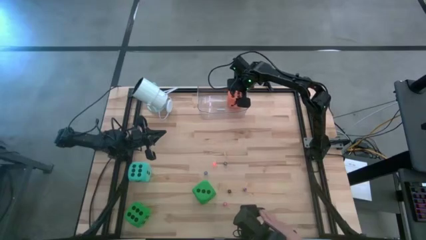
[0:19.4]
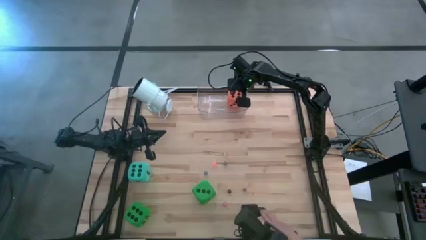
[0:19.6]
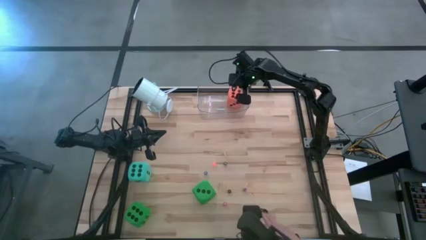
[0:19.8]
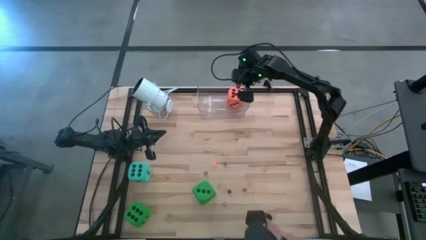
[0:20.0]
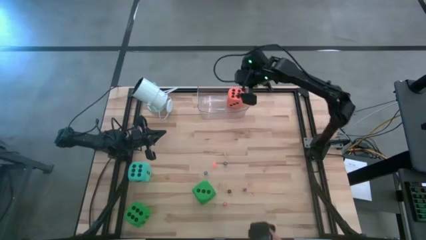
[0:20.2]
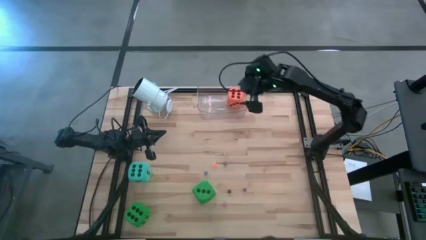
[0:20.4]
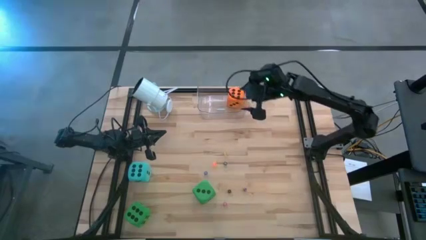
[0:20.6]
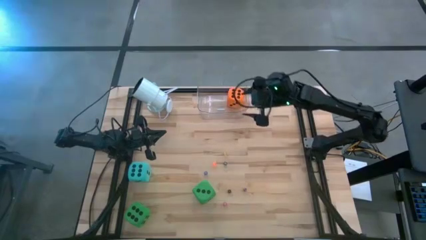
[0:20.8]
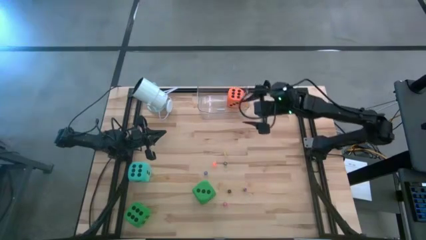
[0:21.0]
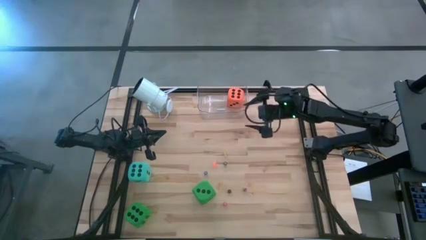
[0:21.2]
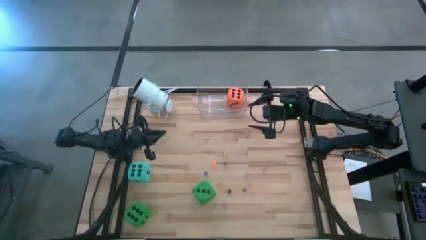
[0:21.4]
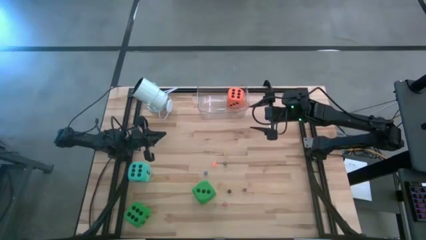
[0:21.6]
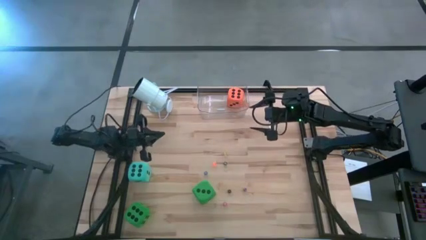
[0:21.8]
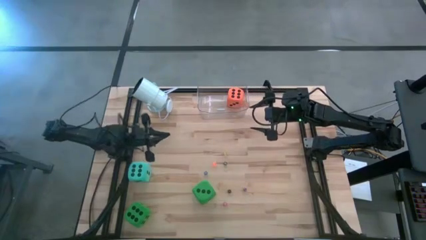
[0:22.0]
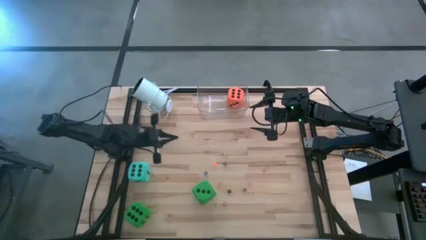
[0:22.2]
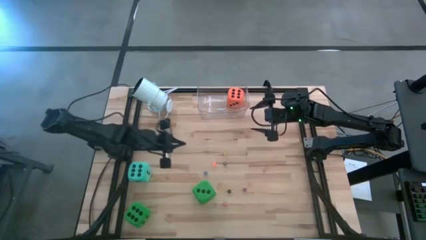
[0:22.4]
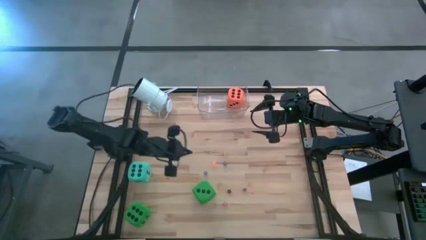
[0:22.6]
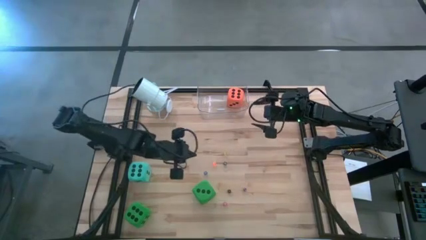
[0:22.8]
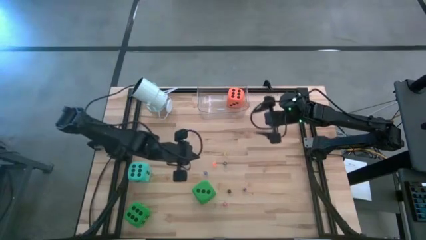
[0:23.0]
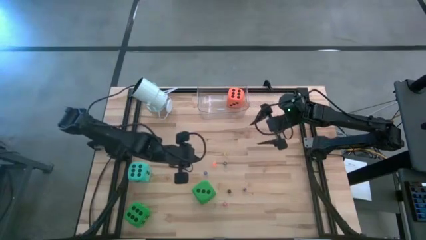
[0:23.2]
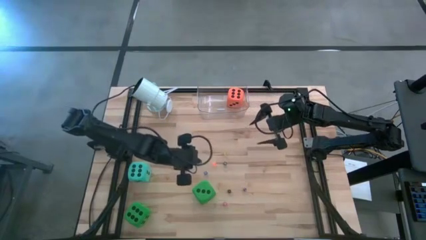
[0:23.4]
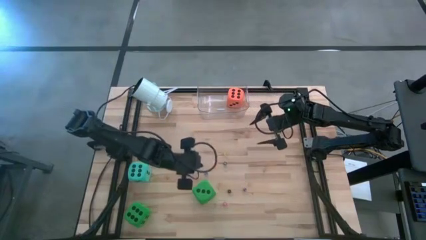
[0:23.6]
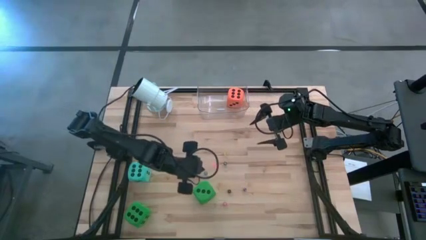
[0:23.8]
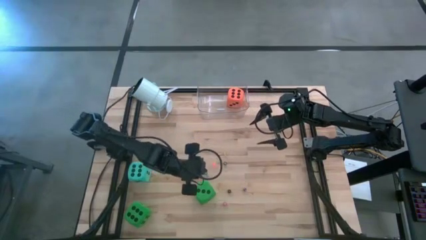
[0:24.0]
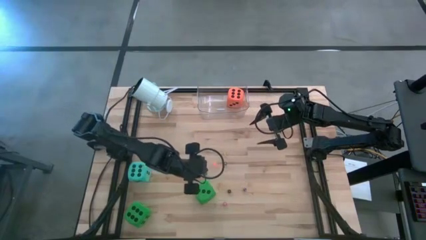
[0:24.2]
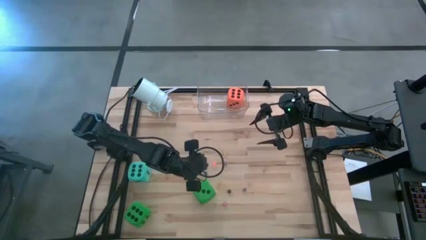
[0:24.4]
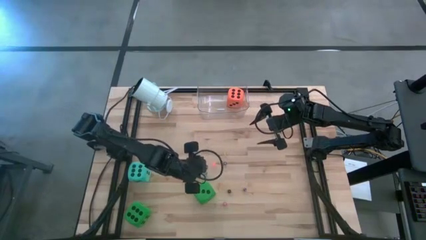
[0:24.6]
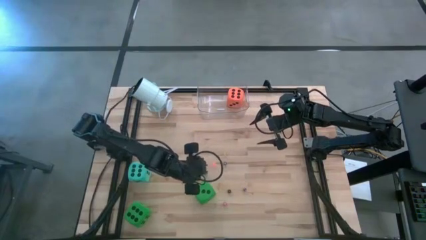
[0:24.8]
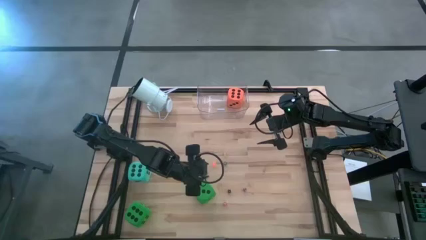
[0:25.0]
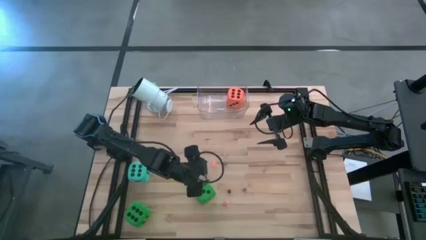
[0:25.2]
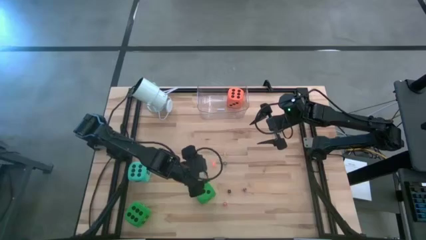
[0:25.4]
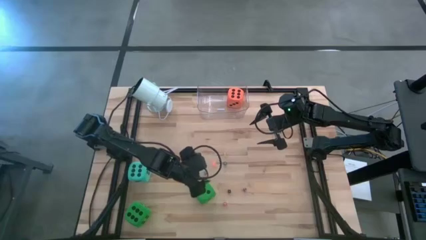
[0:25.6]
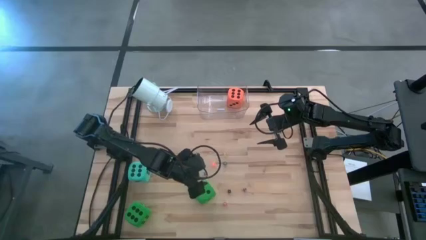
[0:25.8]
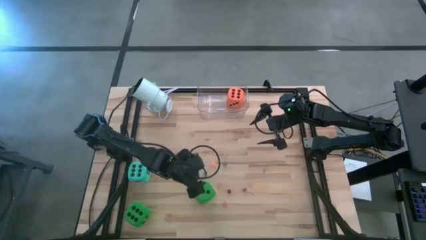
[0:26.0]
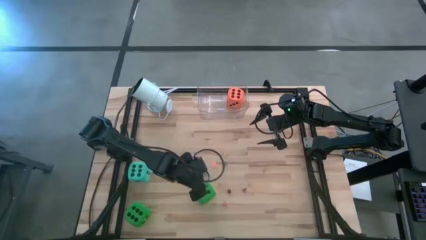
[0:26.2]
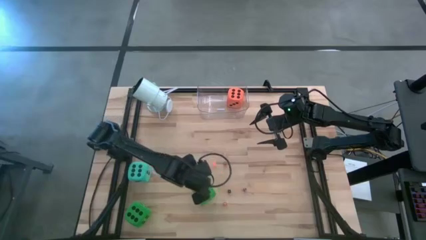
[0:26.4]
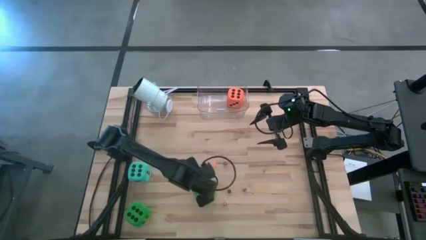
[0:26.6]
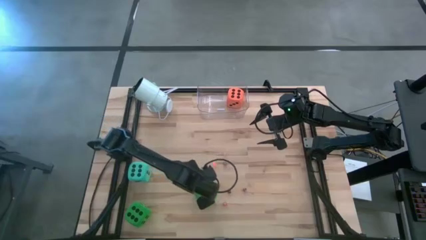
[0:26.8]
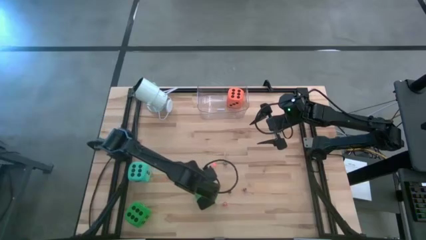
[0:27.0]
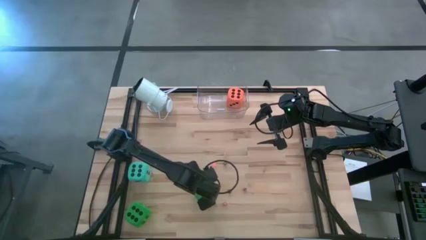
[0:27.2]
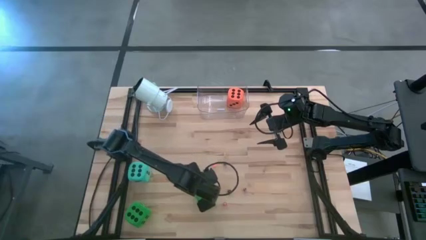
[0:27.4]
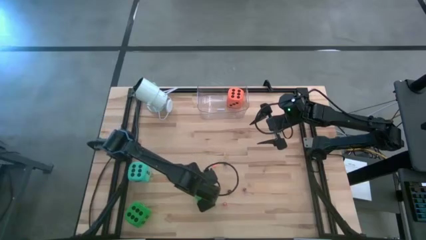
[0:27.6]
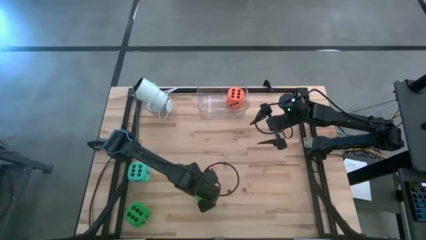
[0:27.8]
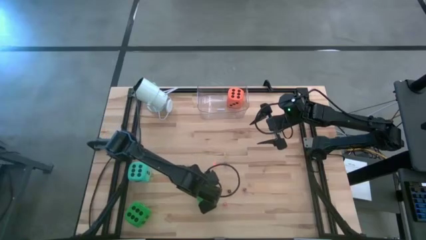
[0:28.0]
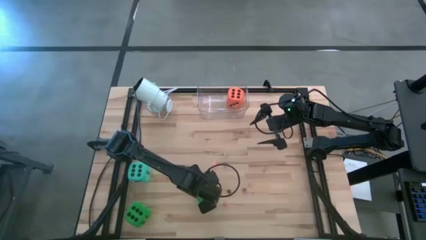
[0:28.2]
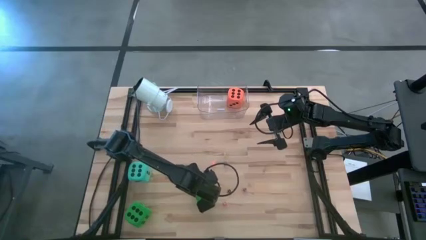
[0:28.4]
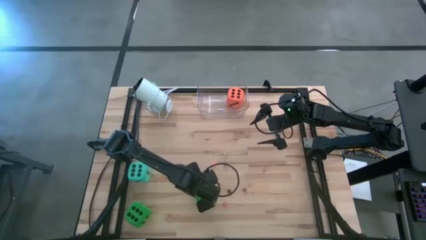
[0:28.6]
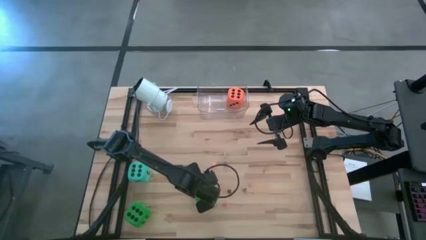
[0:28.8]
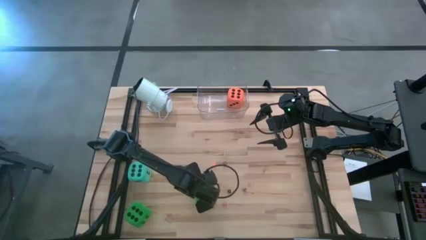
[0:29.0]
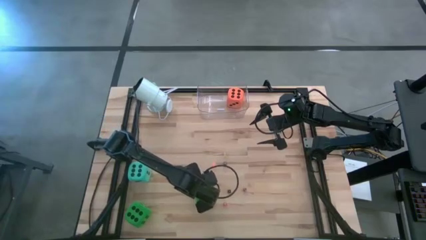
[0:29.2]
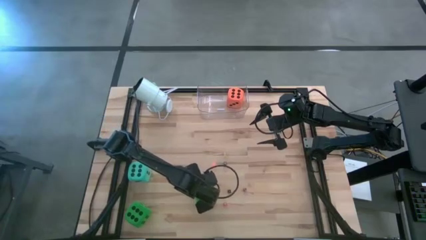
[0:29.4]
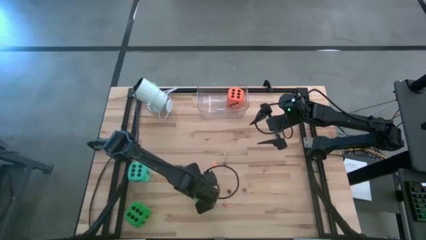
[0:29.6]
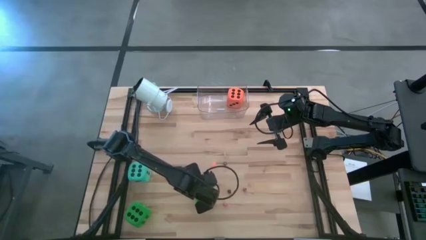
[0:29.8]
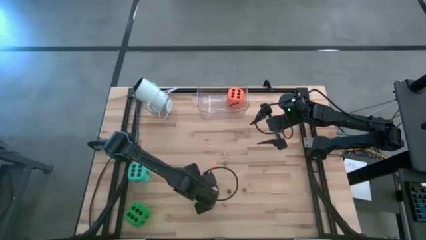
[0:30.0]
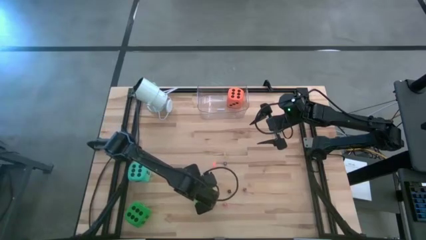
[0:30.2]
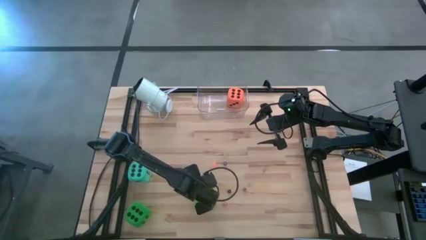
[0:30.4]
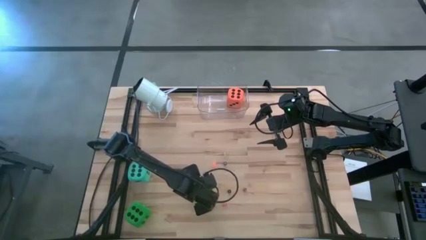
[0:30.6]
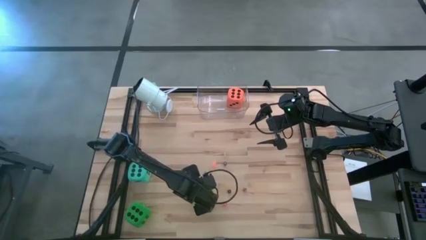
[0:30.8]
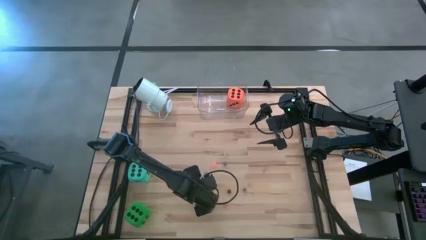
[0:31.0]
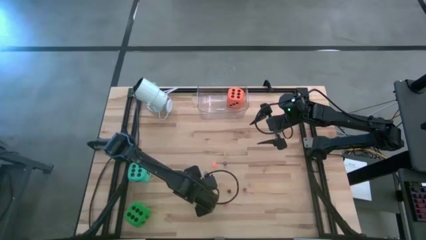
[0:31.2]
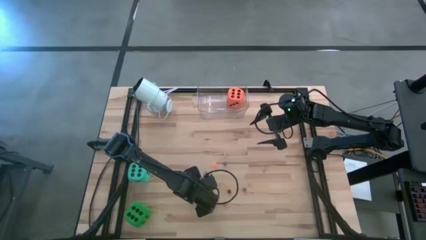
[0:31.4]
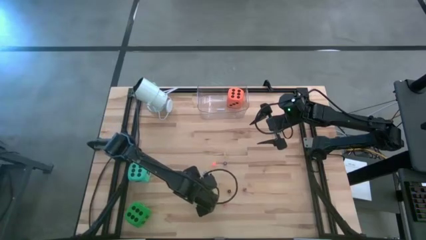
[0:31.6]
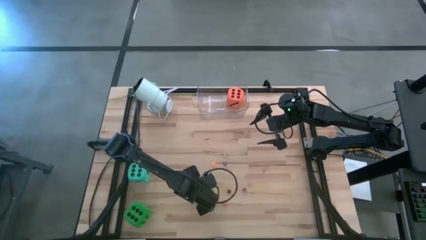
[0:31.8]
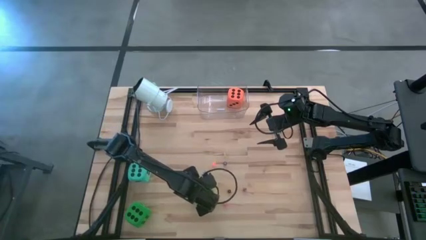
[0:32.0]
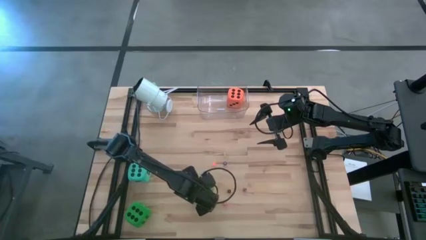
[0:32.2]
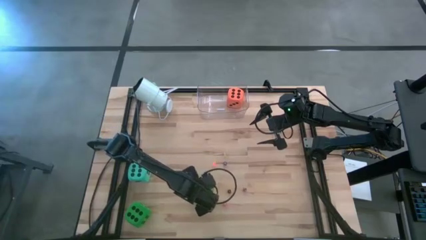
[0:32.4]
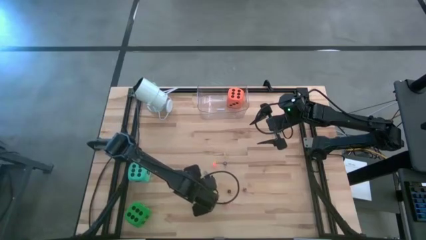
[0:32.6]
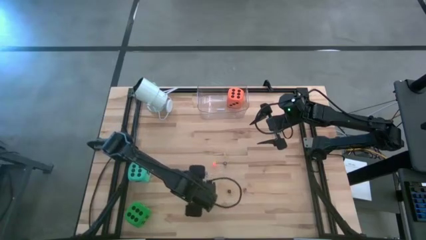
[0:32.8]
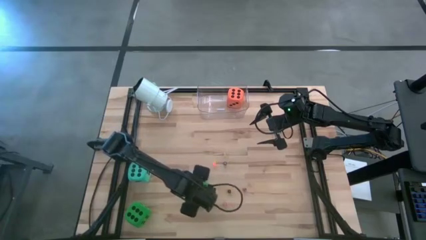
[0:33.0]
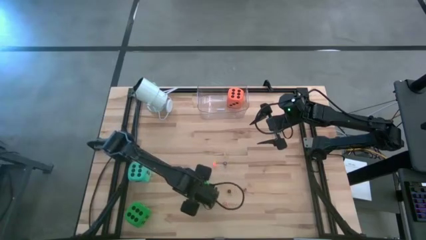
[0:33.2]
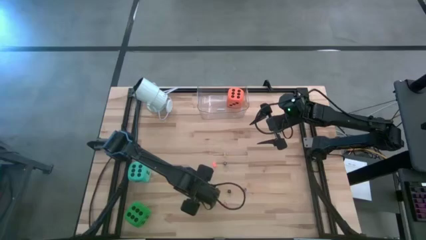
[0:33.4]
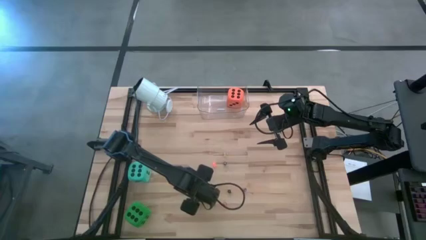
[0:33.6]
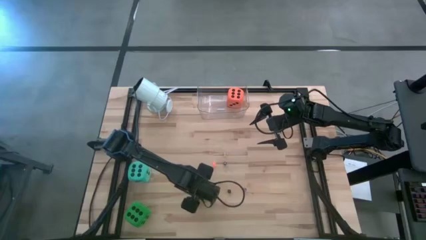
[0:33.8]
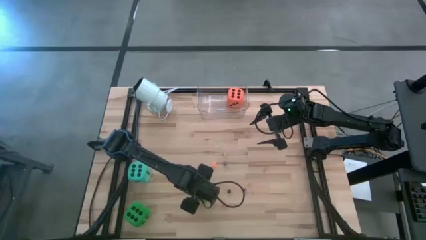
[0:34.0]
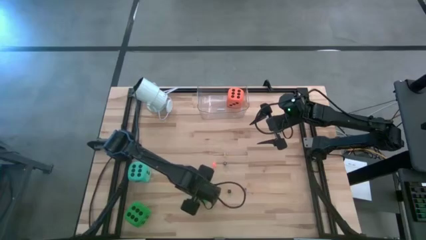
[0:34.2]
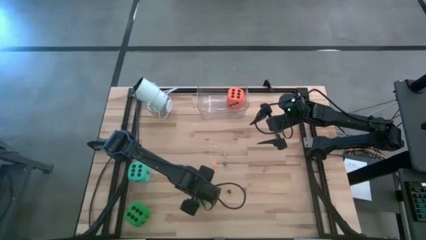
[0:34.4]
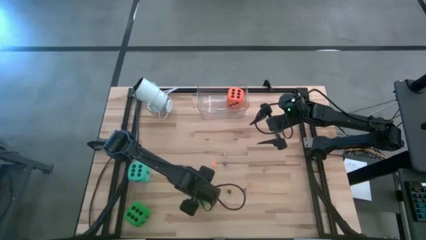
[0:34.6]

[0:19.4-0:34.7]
Task: Pick & Place Dice
Put the top big green dice into the transparent bin
